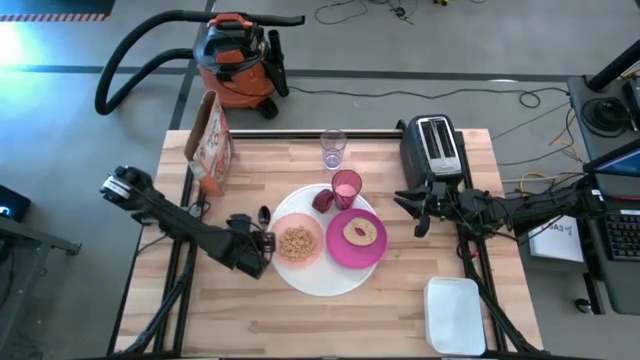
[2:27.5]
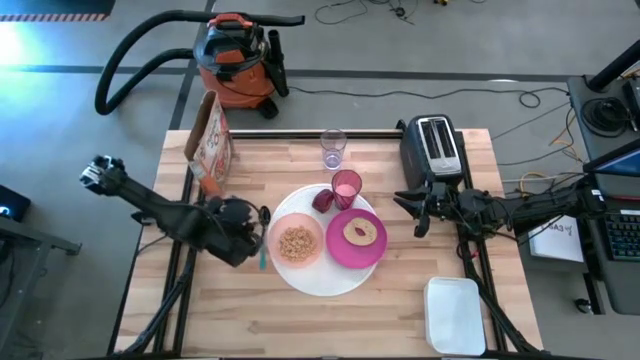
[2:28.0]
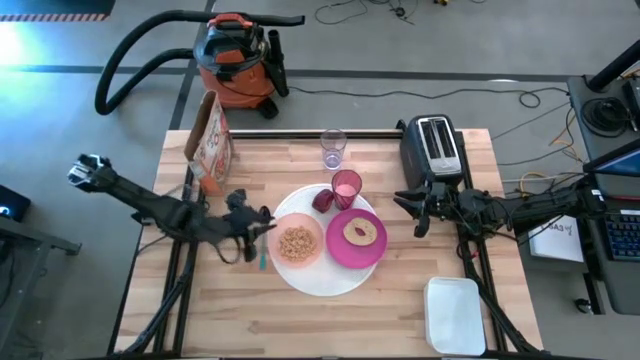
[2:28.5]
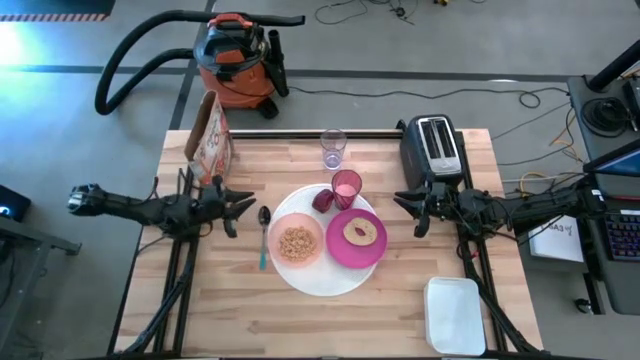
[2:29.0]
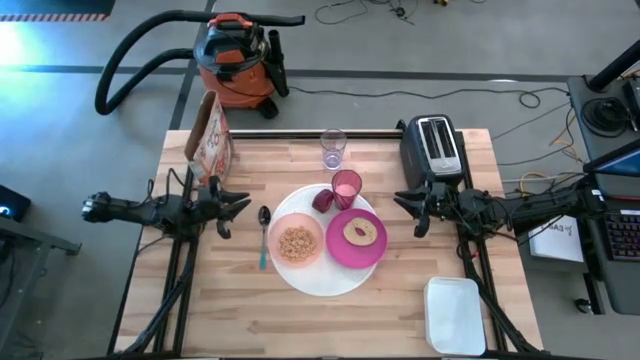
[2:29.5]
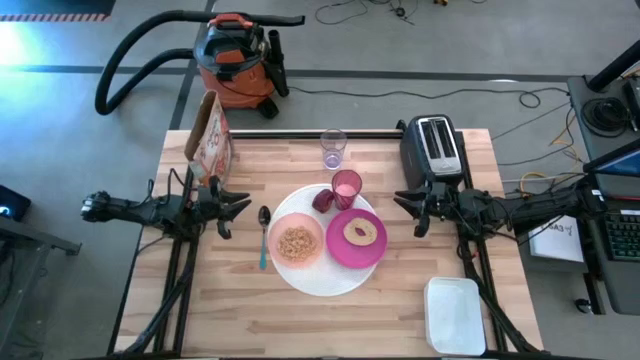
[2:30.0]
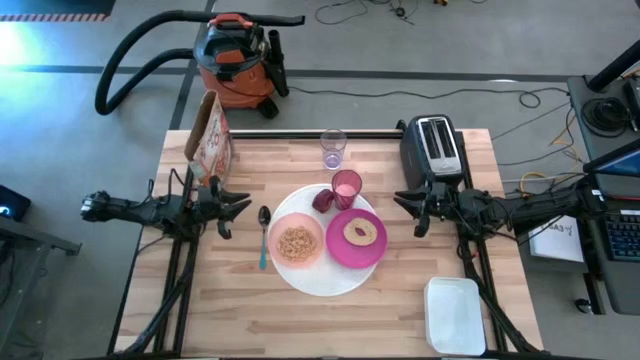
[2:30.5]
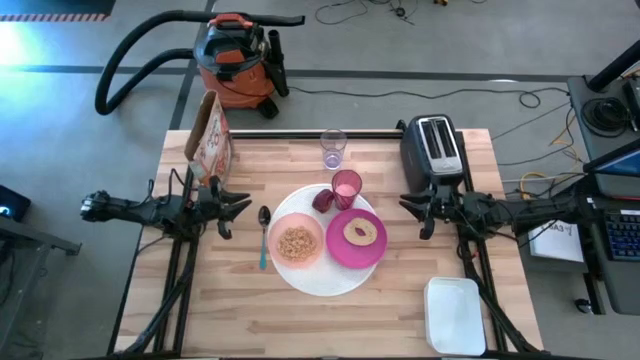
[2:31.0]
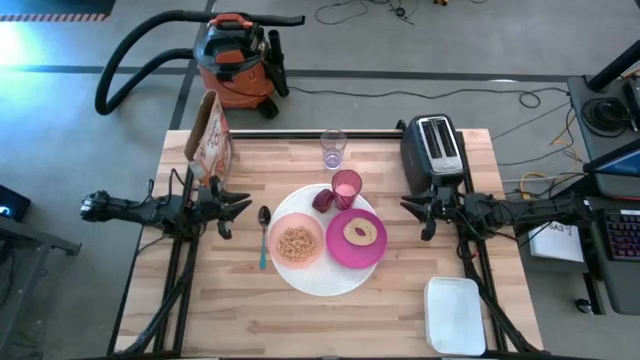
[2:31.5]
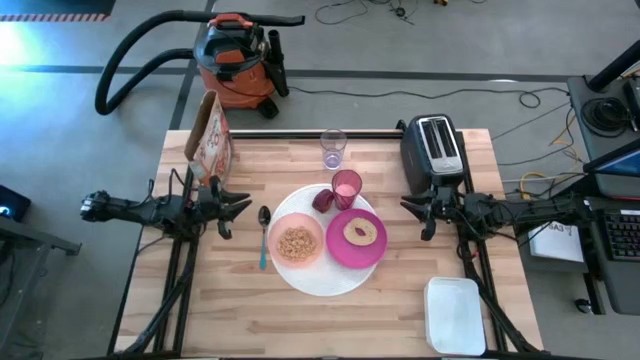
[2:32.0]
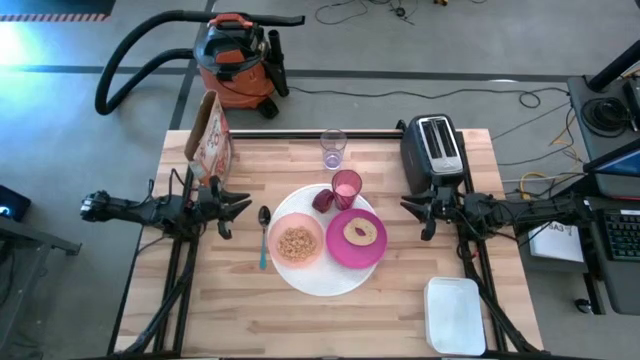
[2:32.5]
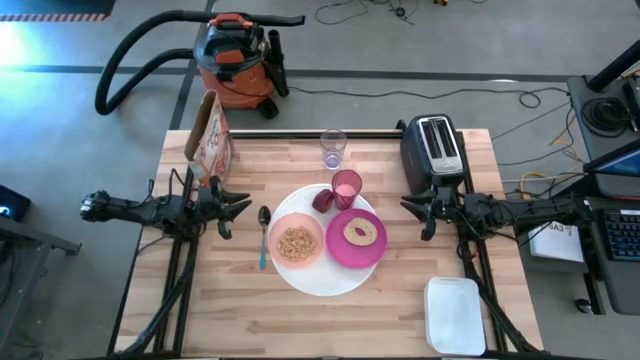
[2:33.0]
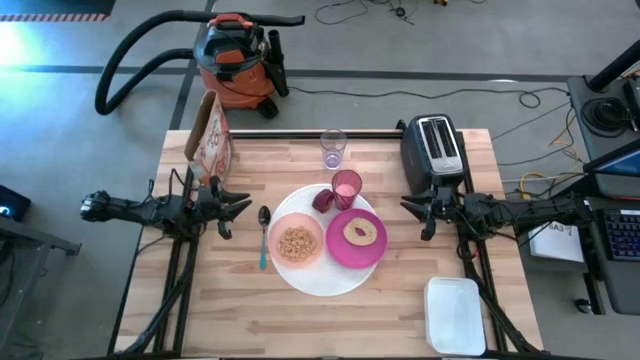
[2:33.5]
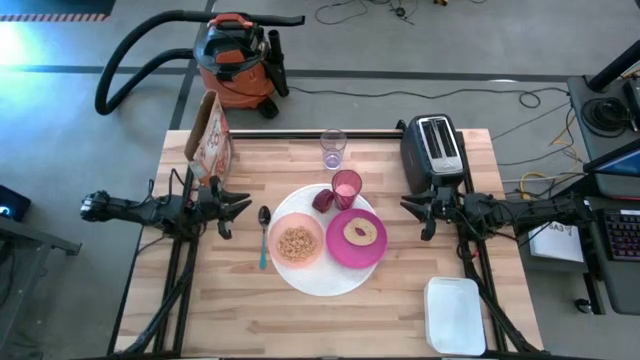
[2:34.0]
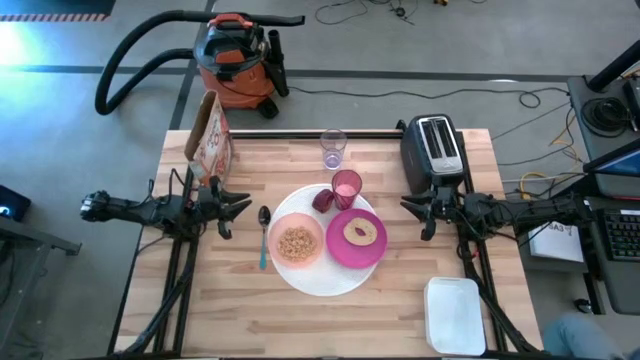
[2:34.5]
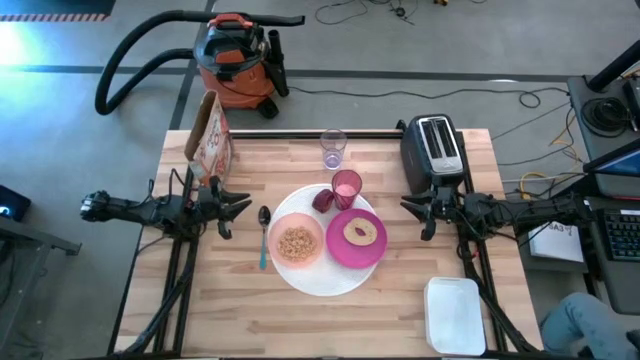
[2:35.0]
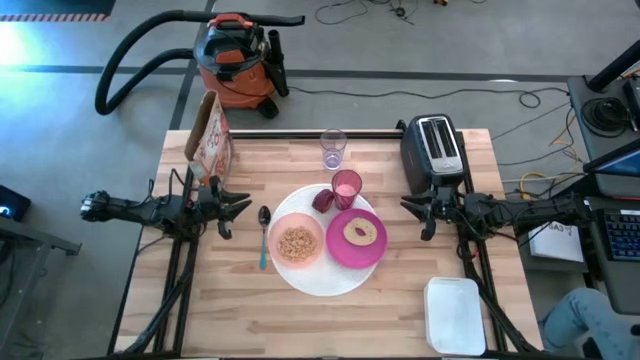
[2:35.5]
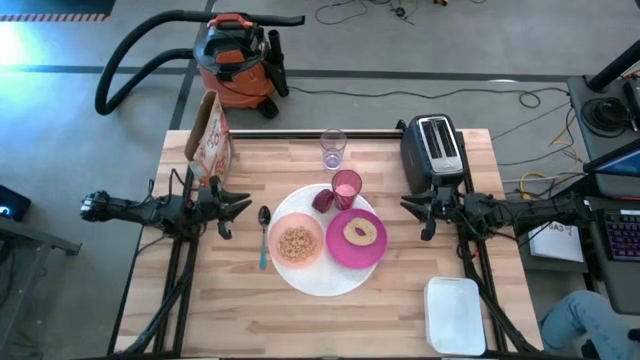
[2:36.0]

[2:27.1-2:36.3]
Task: Arrange a breakfast setting
Return to Home Position

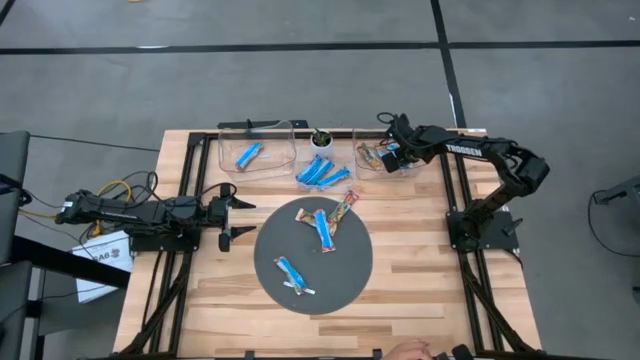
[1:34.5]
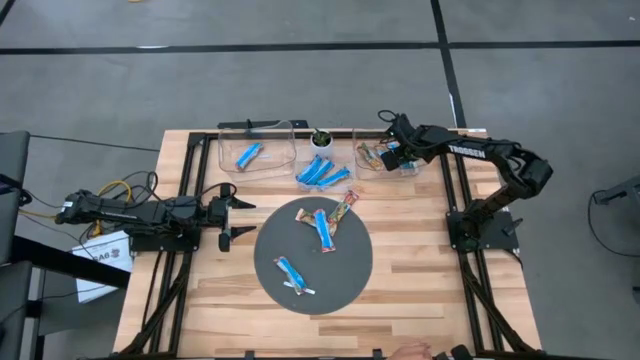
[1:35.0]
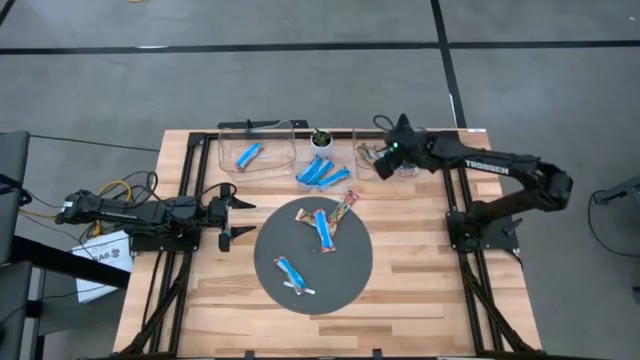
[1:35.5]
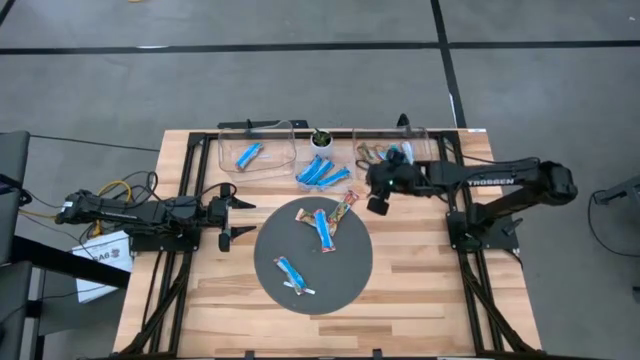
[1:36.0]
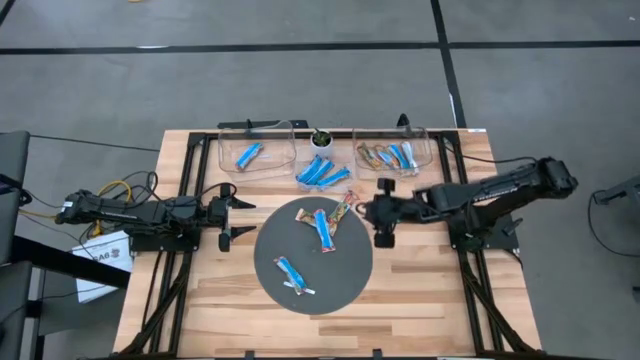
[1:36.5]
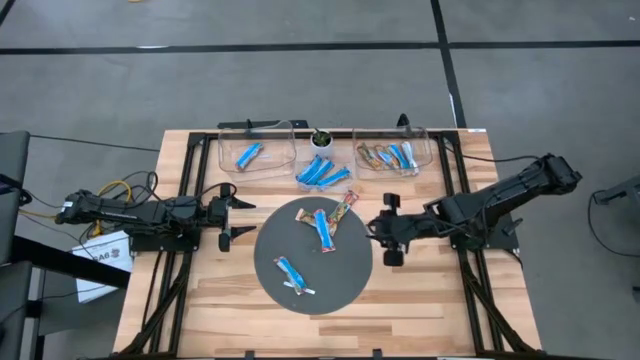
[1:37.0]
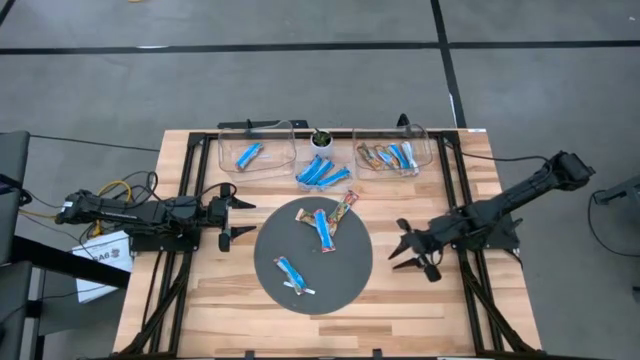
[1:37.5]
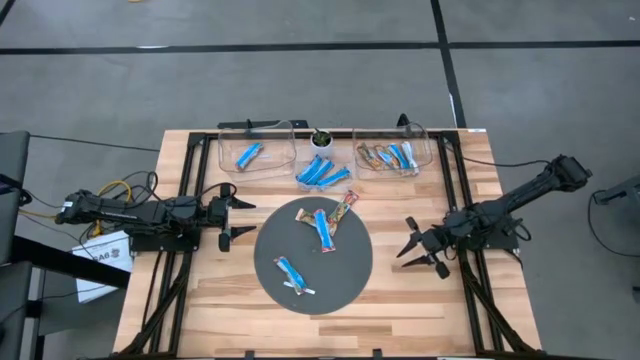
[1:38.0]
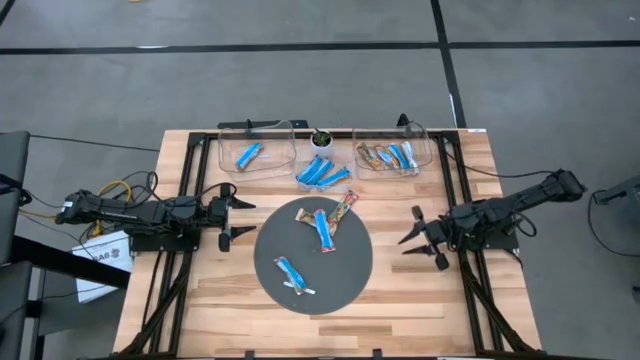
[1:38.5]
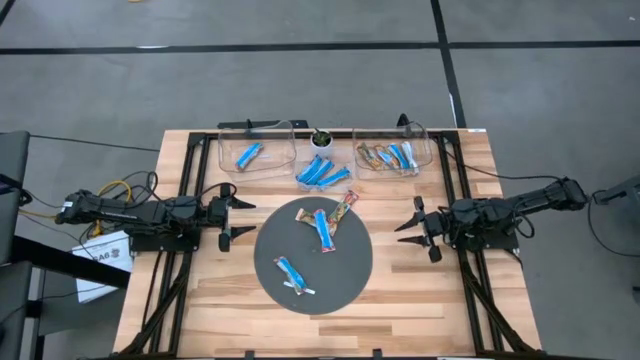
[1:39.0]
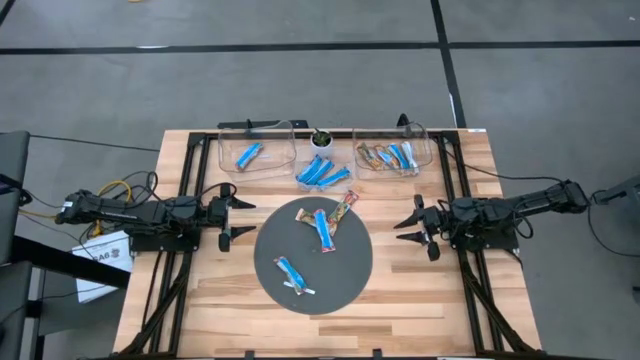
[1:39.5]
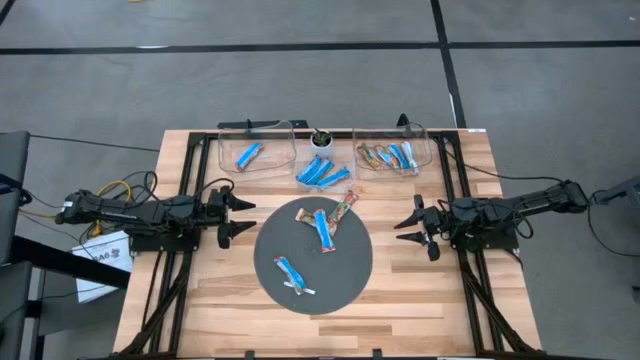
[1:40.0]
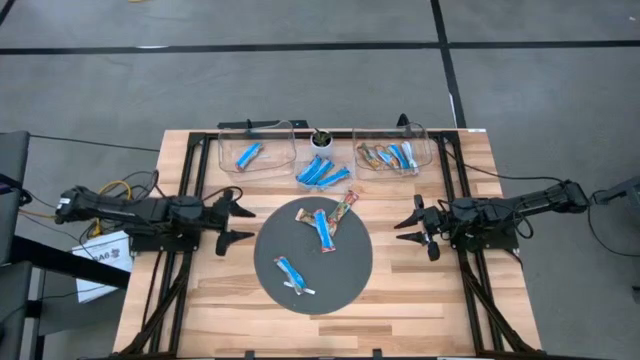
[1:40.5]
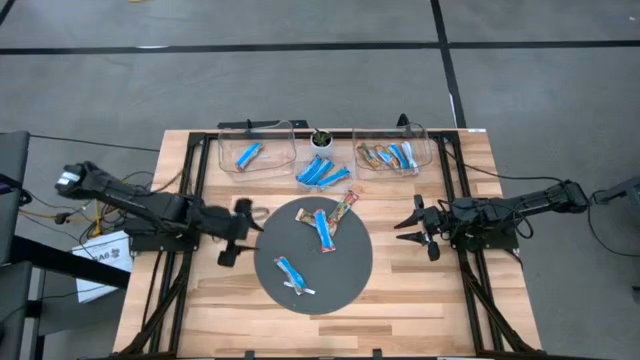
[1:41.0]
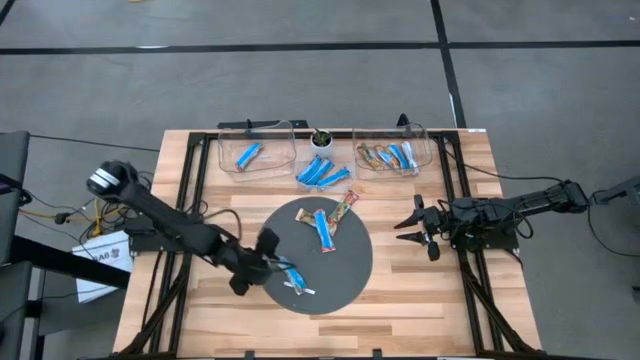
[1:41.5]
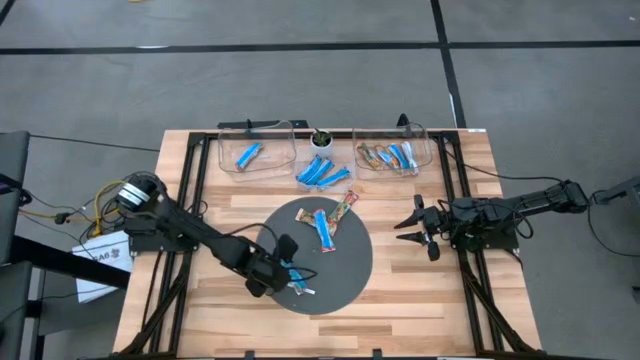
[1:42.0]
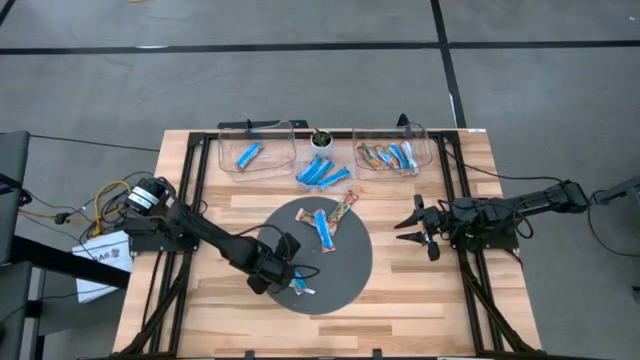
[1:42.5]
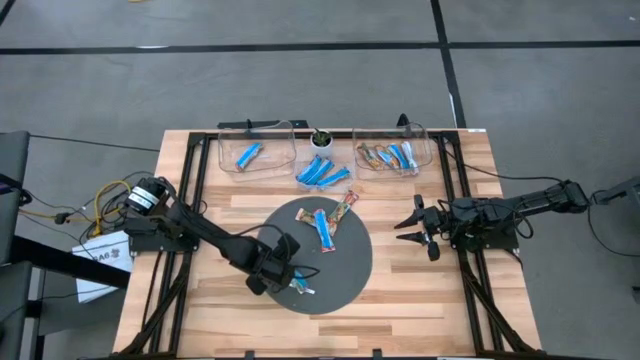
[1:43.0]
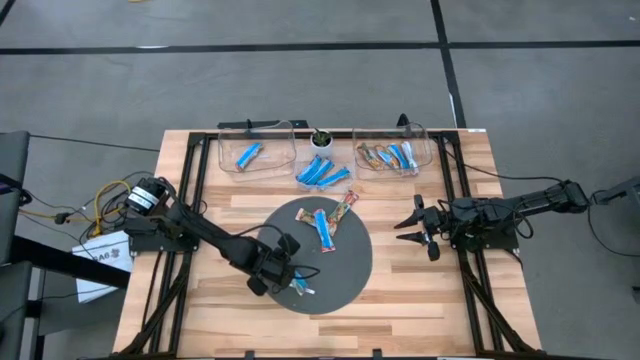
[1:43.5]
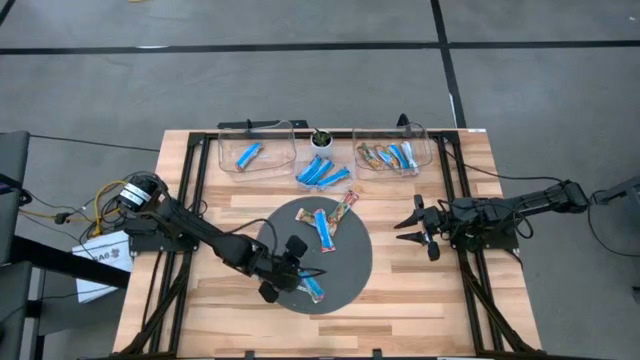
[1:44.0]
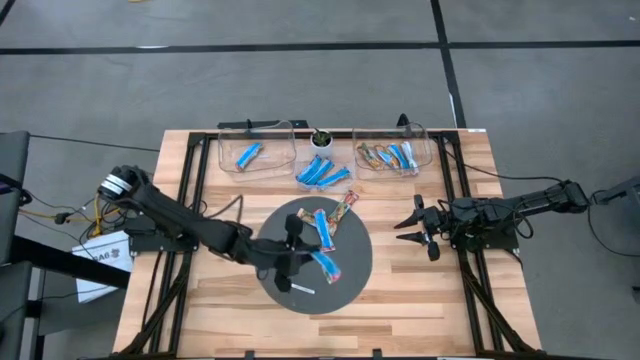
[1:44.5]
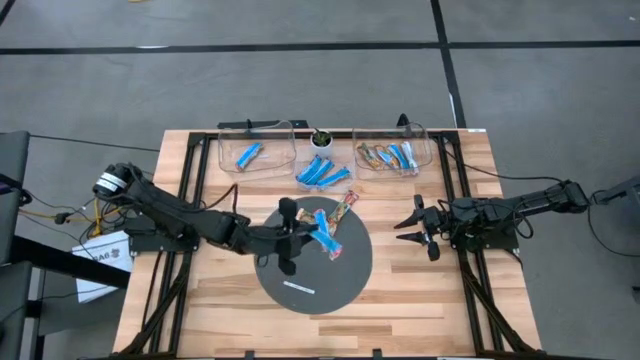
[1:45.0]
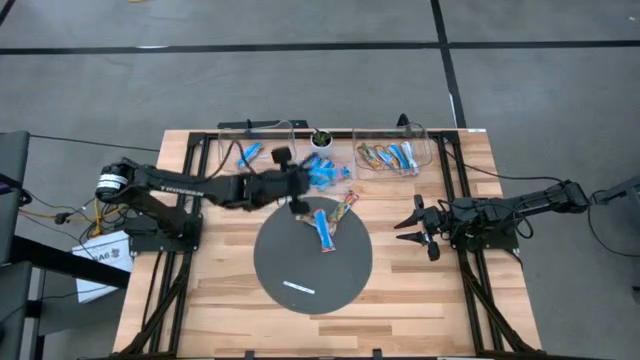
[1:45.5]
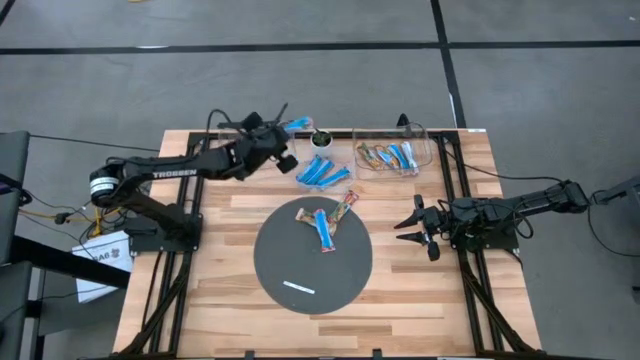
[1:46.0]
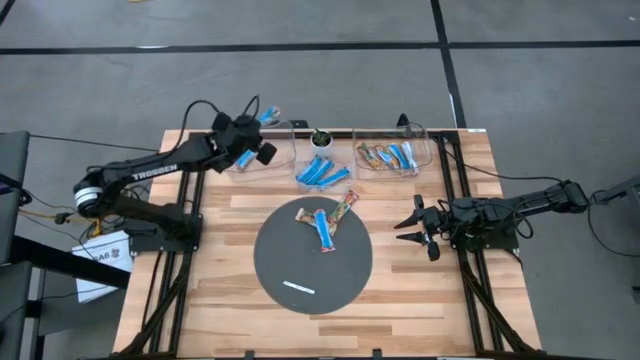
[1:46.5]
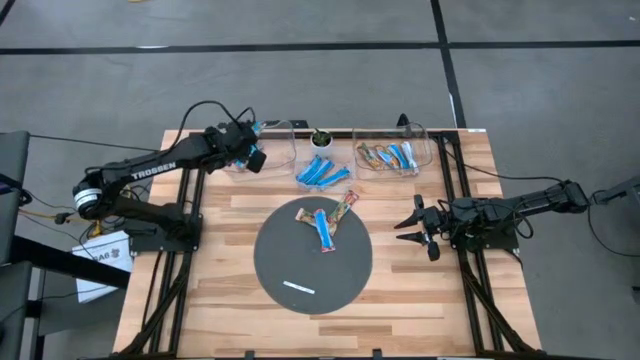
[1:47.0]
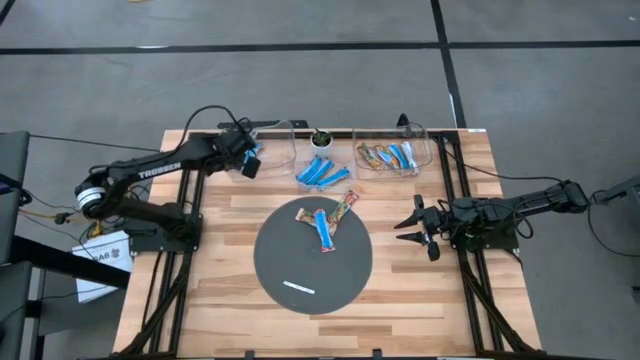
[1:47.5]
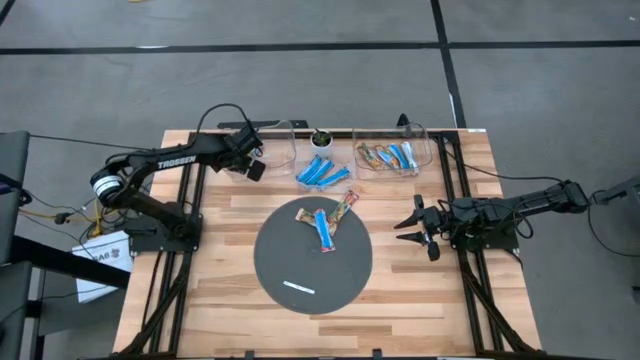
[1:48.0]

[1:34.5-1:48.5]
Task: Pick and place Granola Bars by type
Put the red granola bar into the left transparent bin
